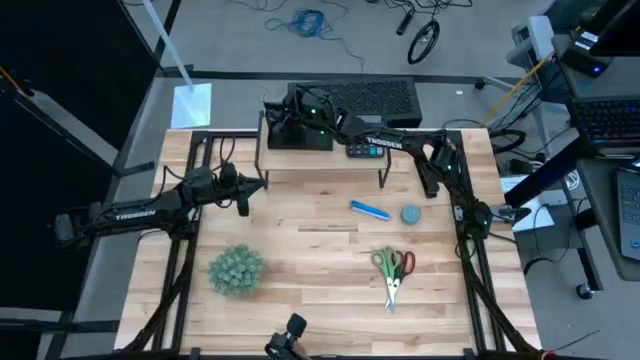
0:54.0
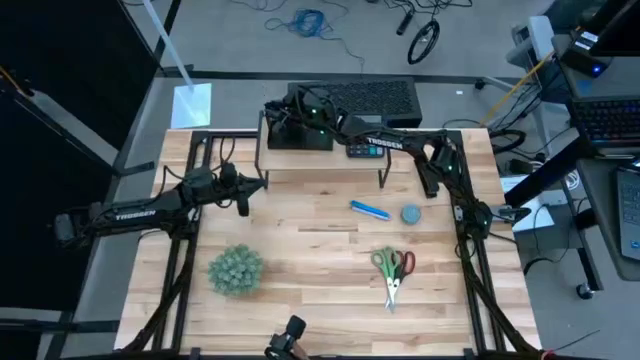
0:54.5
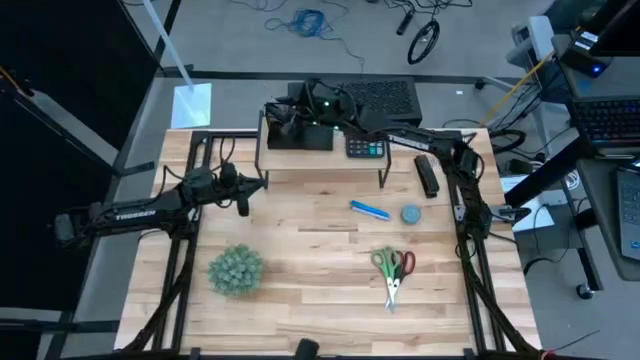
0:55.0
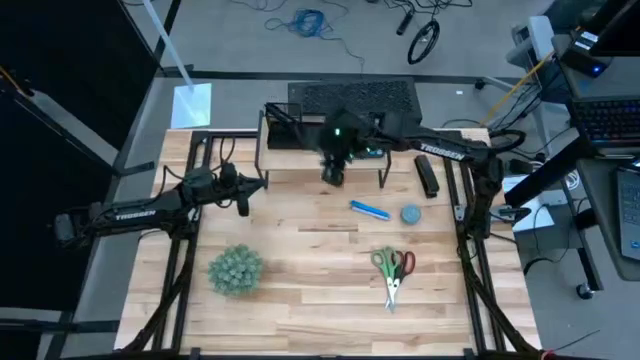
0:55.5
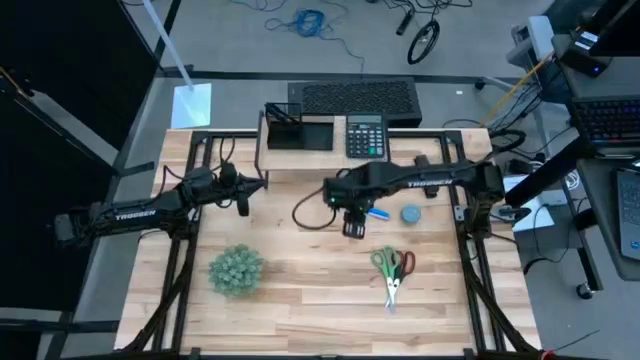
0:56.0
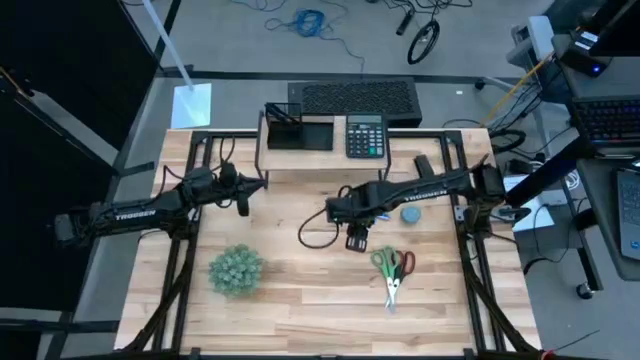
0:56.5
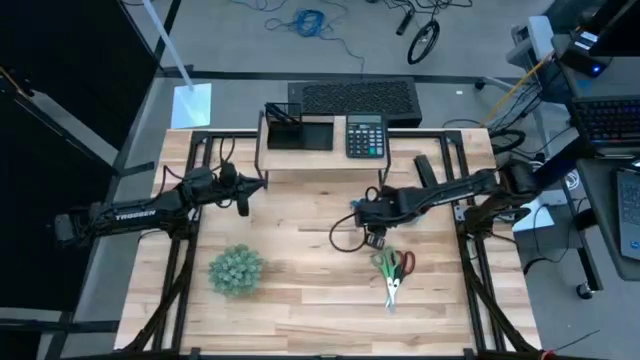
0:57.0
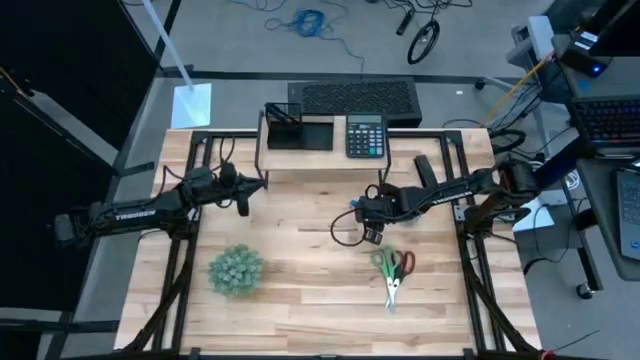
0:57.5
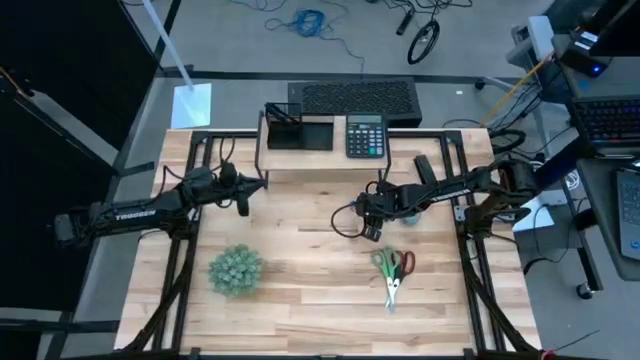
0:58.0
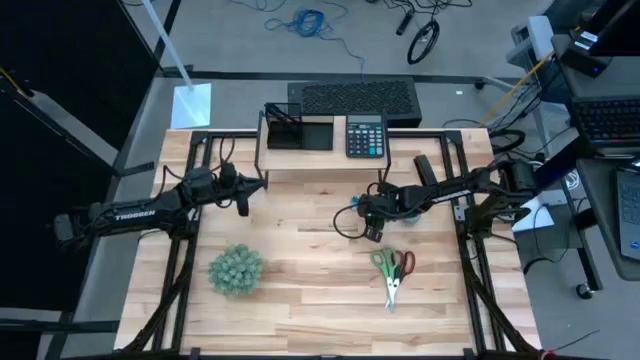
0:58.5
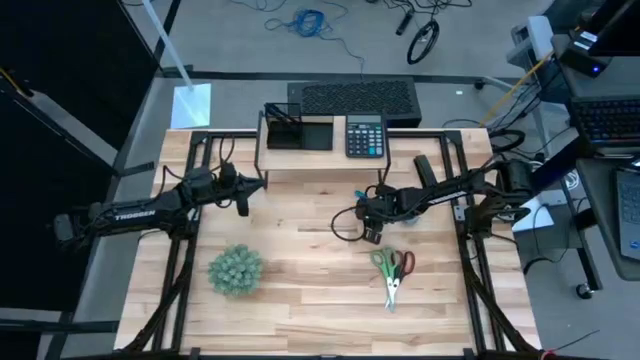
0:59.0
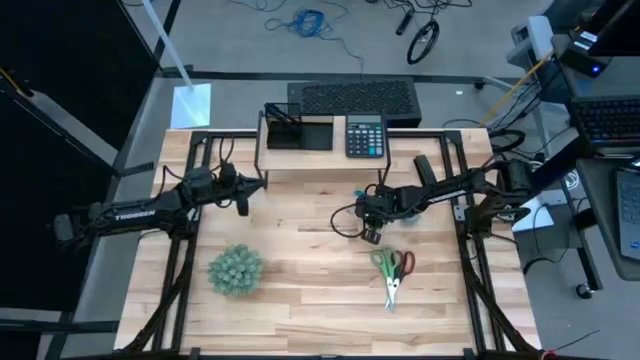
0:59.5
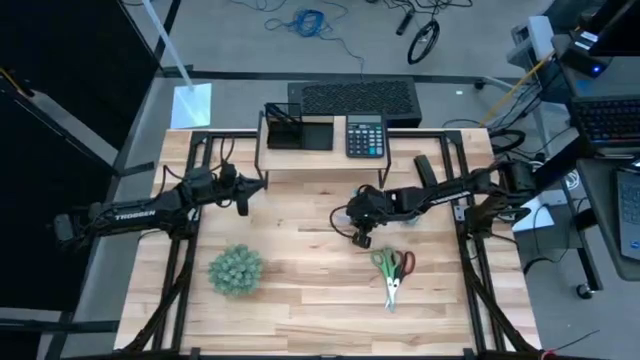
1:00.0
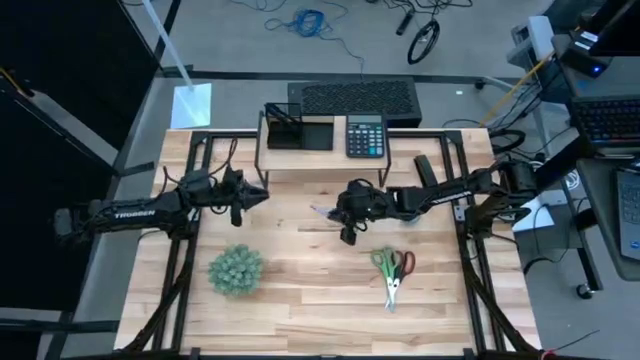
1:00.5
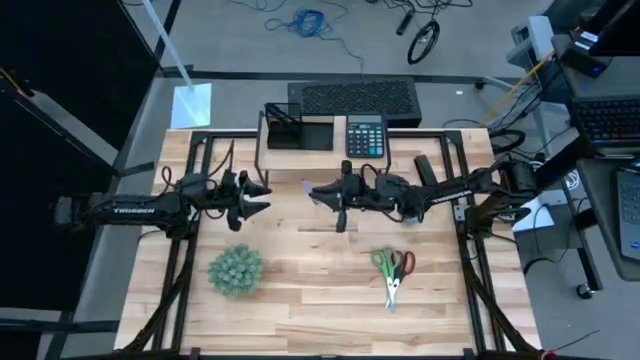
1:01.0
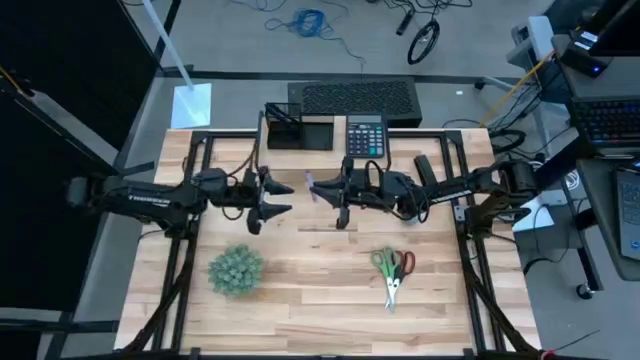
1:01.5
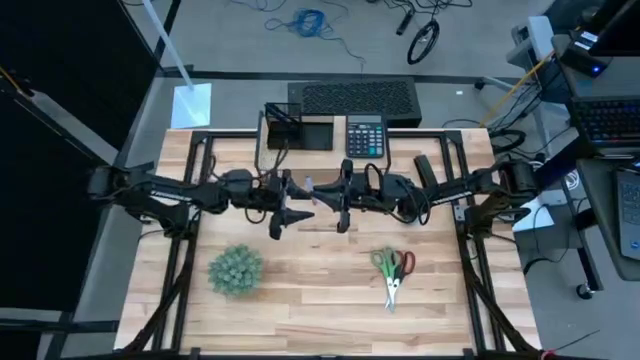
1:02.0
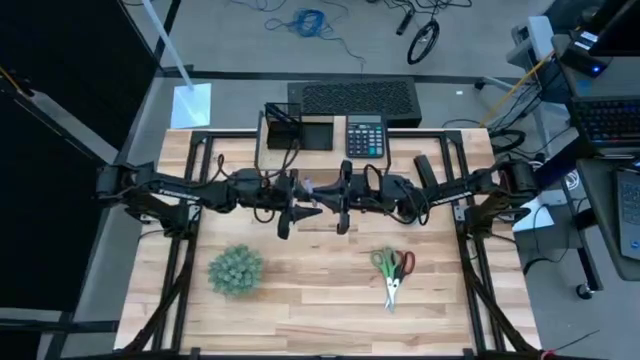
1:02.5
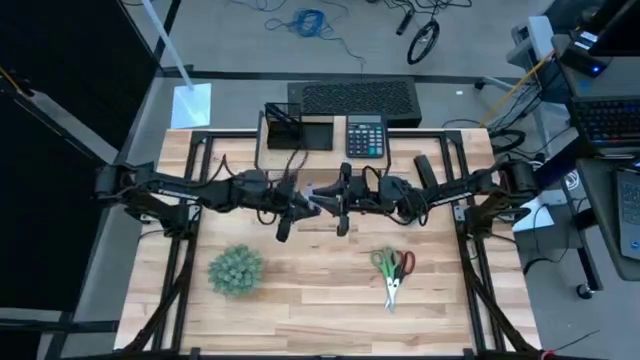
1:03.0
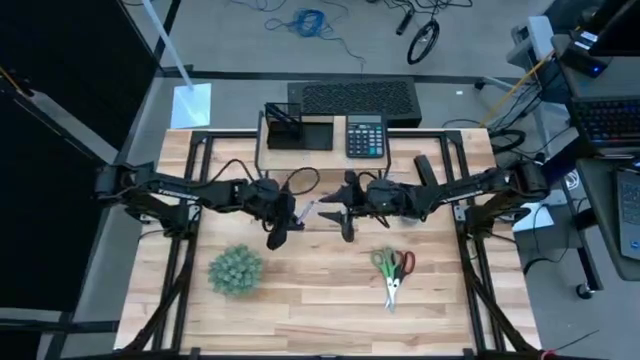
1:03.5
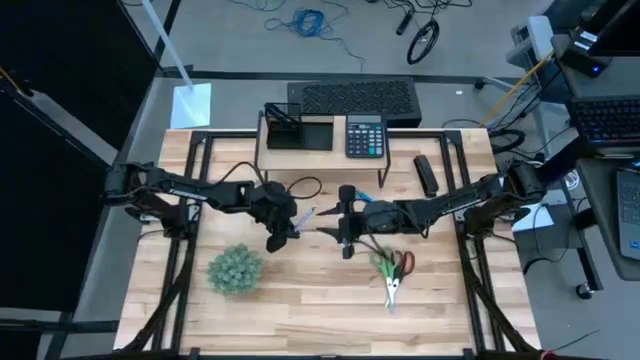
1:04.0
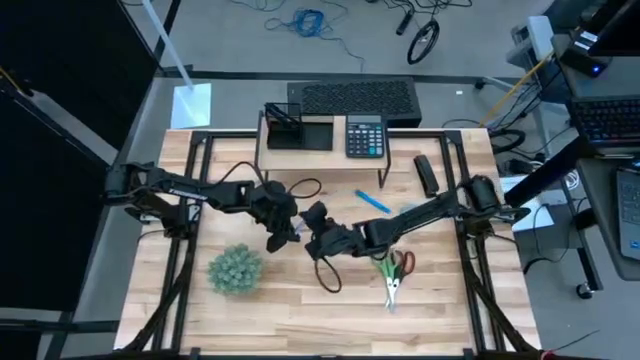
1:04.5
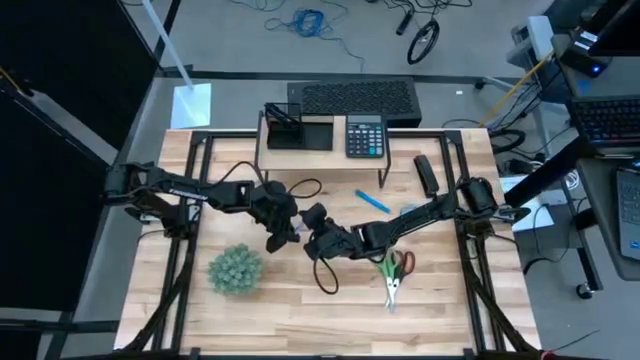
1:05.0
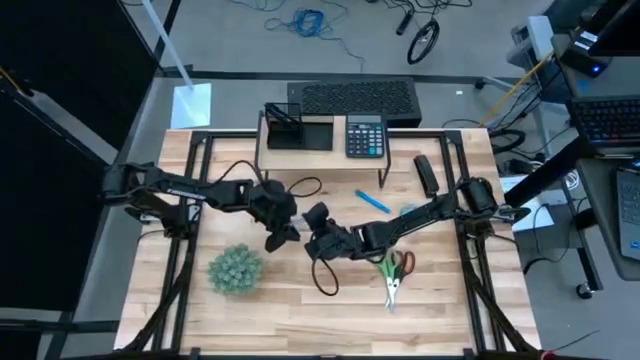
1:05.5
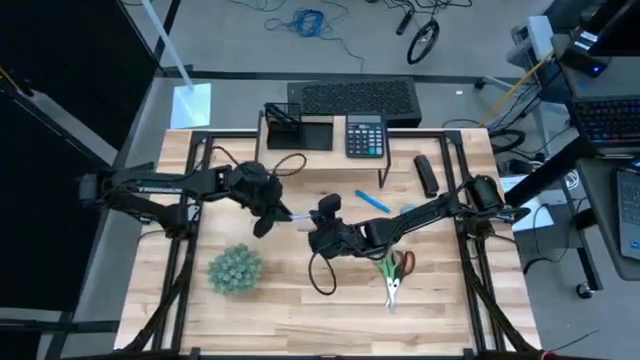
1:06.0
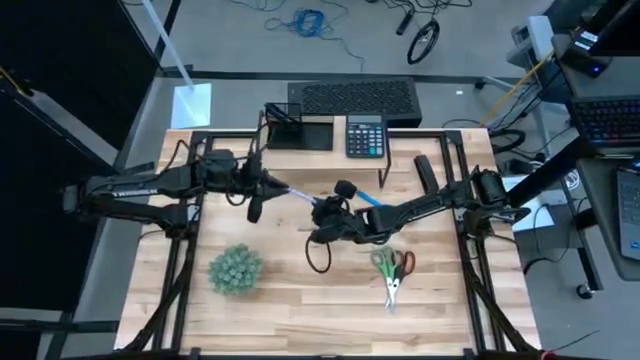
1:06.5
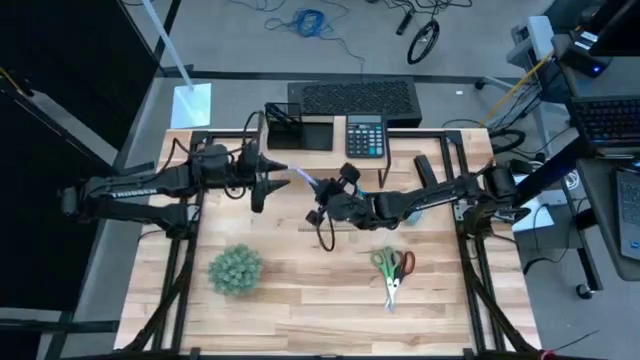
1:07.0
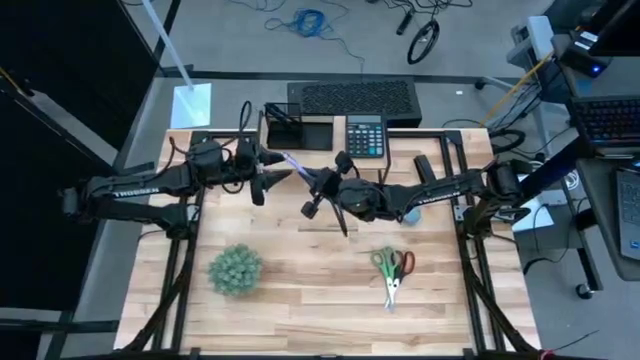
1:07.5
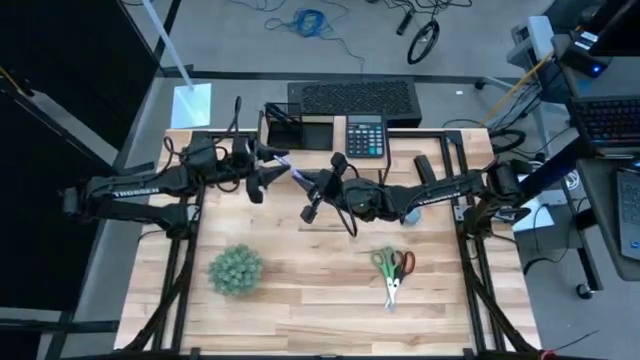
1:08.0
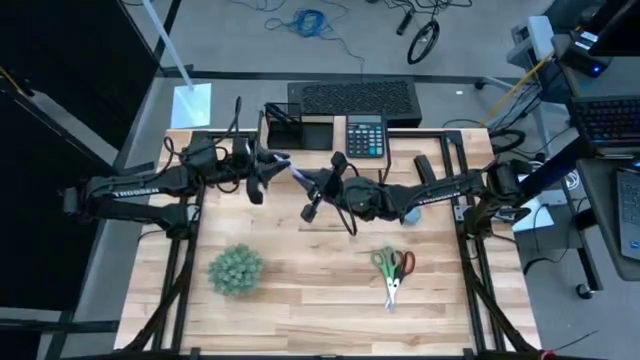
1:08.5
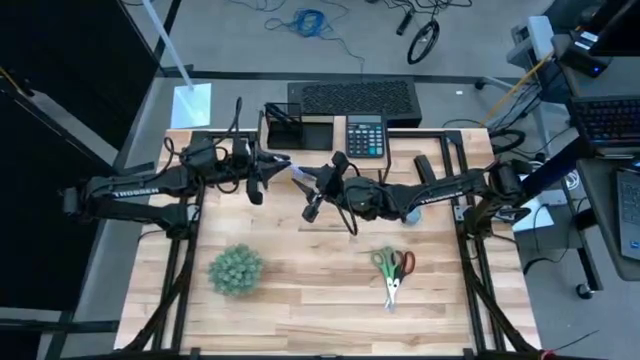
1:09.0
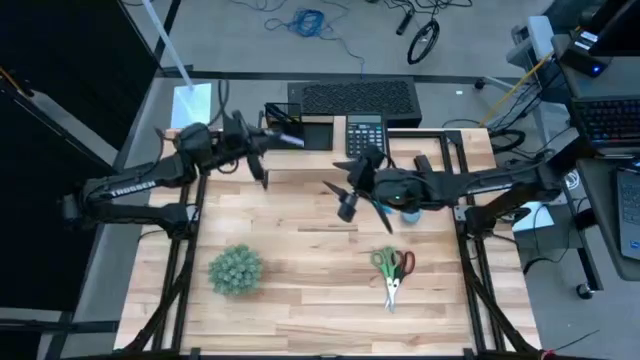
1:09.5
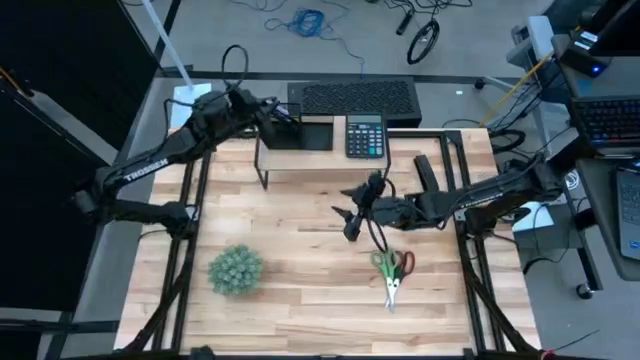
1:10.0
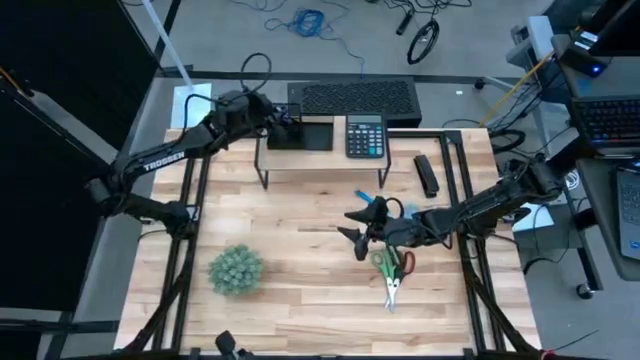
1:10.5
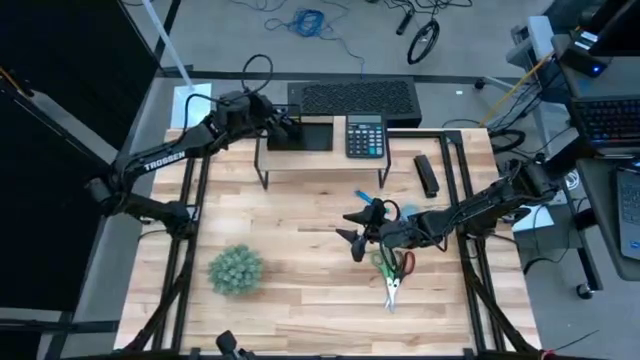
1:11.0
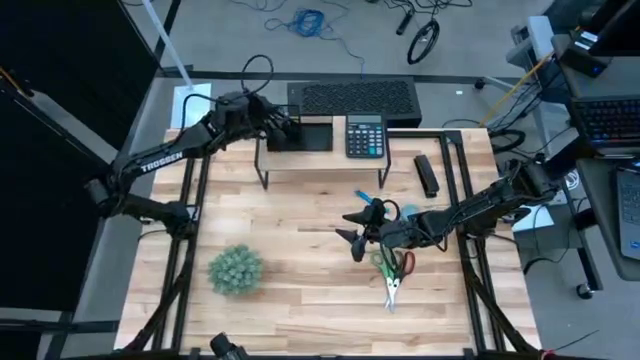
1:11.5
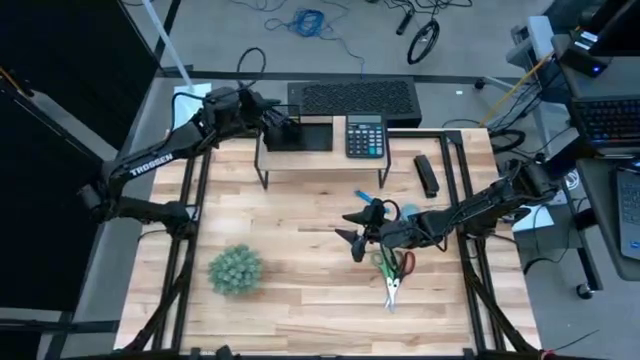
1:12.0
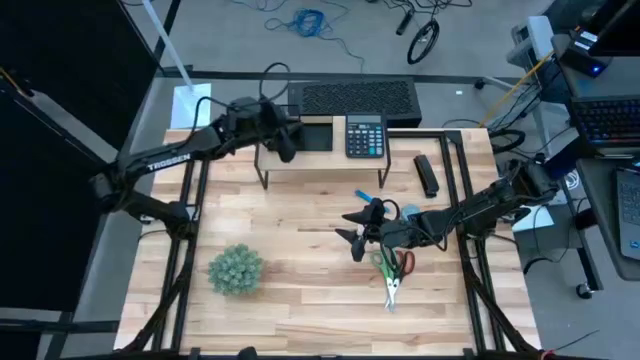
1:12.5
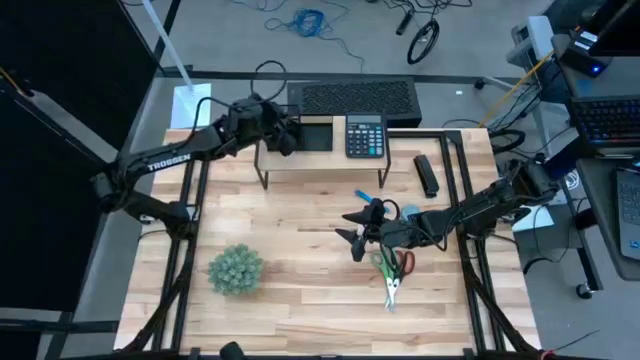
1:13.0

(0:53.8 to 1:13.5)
Task: Pick and place office supplies into organizer
Put the purple pen into the desk organizer on the shelf

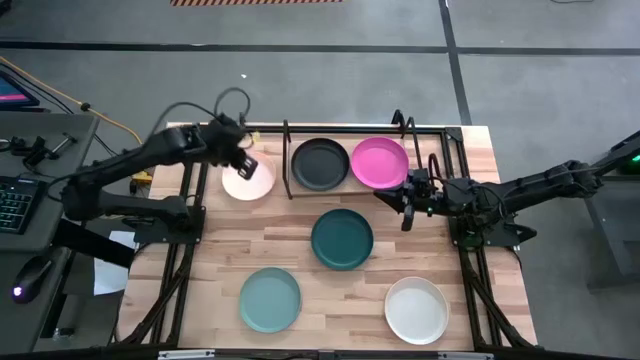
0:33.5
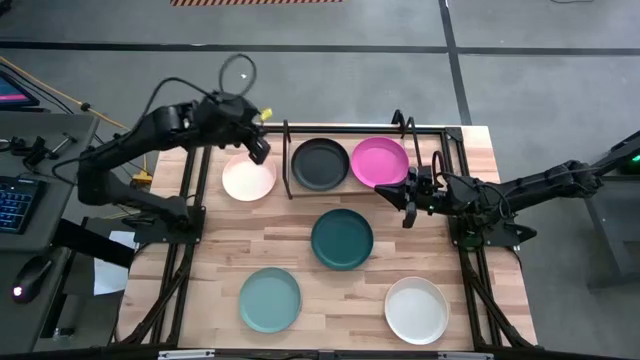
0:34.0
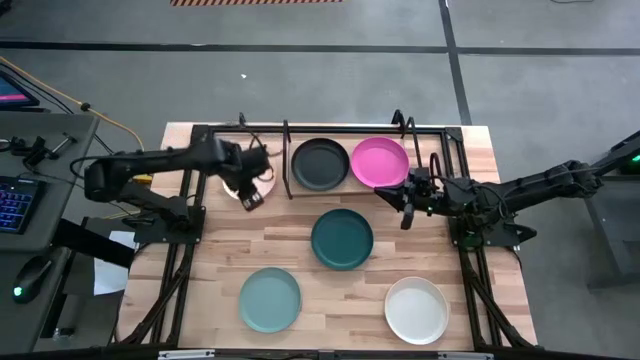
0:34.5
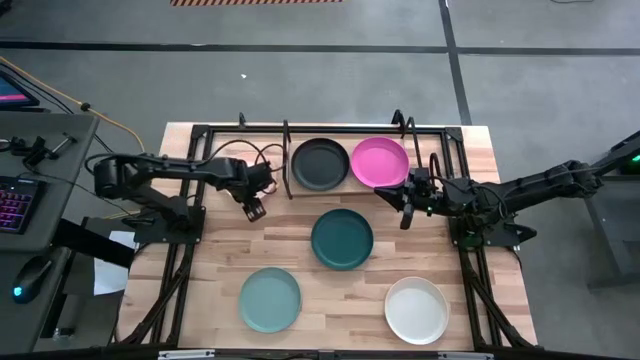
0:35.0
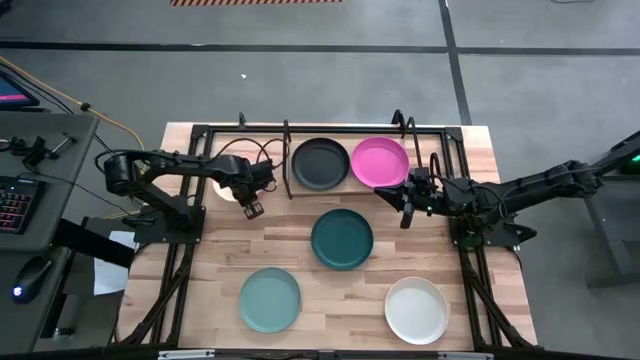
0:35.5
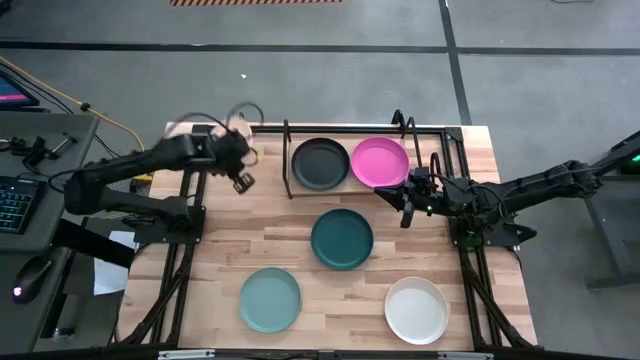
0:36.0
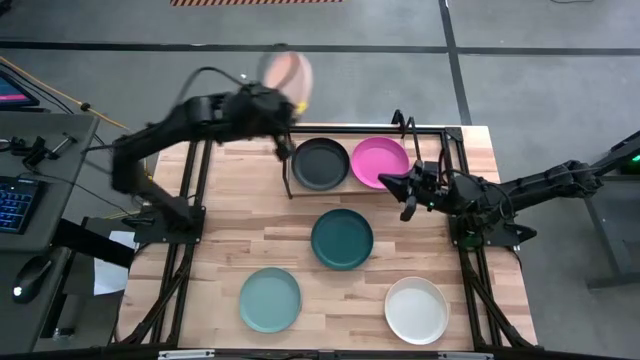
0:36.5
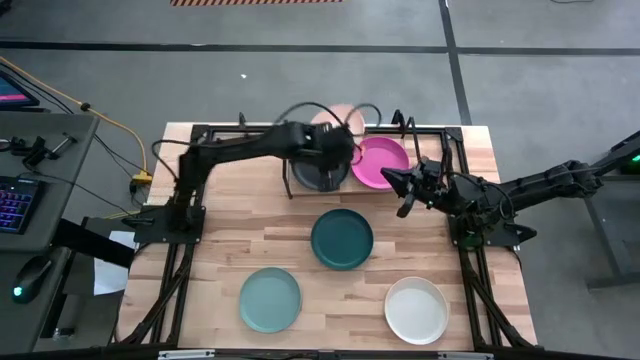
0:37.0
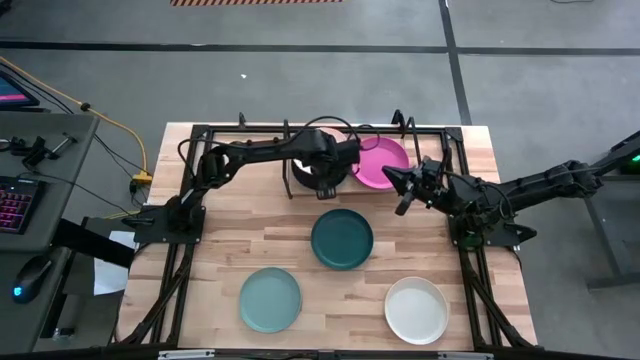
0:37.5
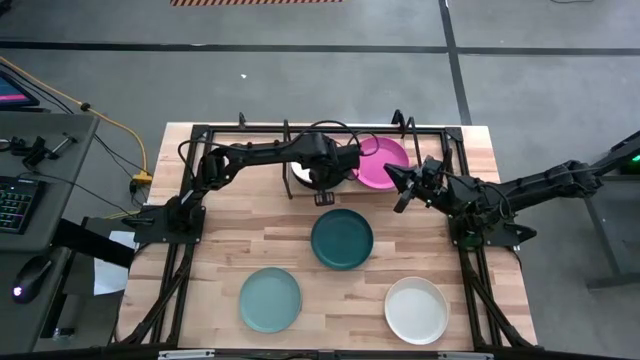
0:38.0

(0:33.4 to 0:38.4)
Task: Place and stack plates onto a shelf
Stack the light pink plate on top of the black plate on the shelf
